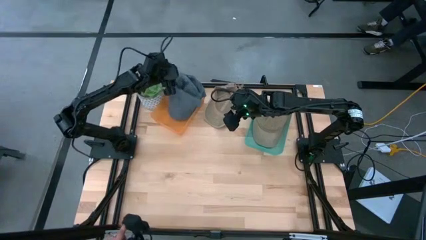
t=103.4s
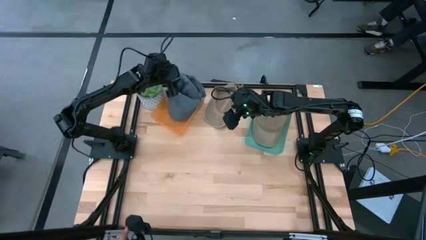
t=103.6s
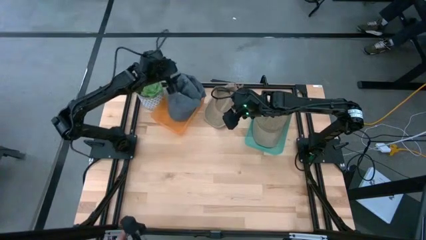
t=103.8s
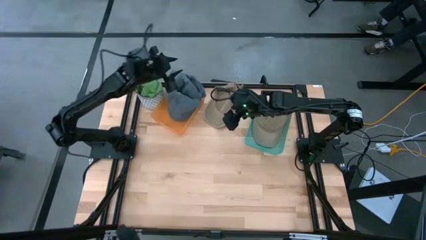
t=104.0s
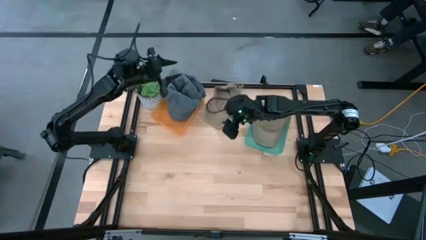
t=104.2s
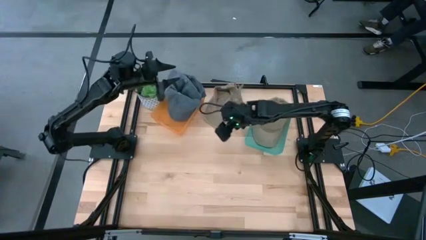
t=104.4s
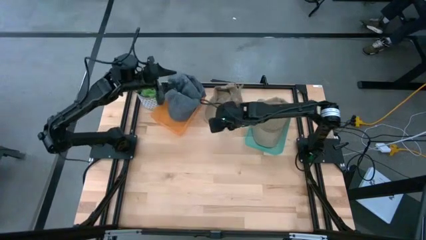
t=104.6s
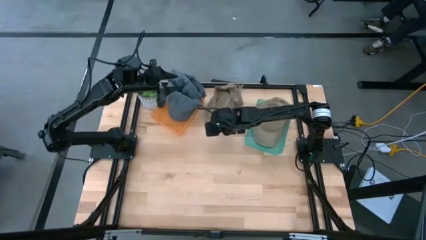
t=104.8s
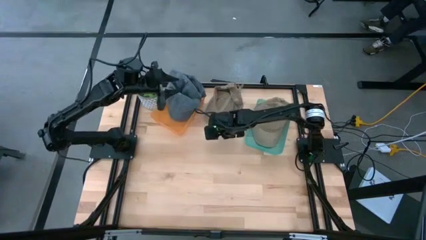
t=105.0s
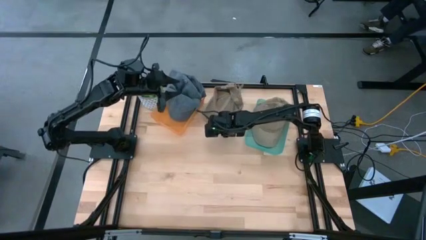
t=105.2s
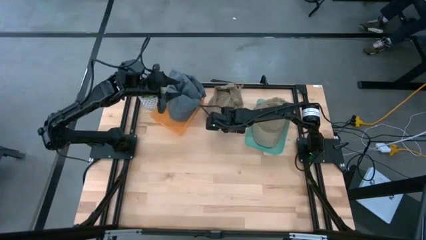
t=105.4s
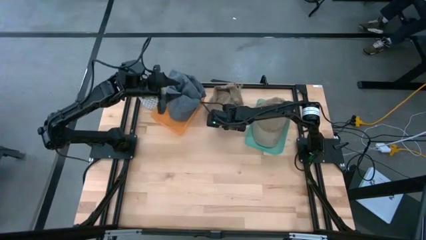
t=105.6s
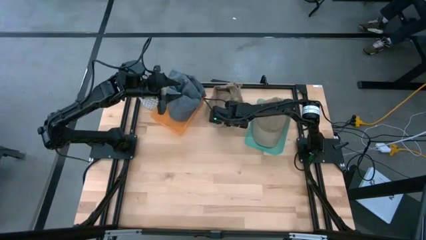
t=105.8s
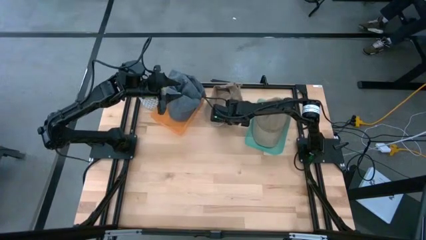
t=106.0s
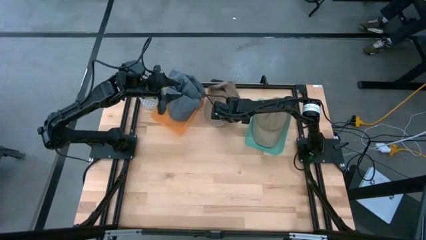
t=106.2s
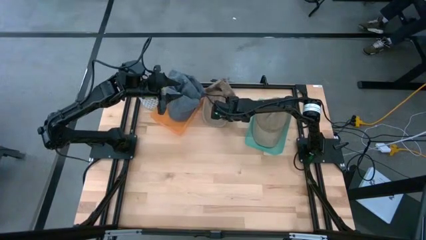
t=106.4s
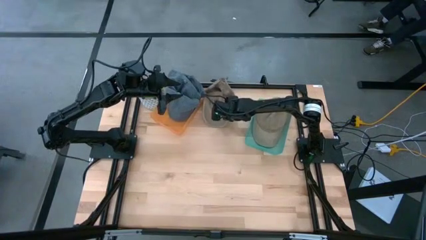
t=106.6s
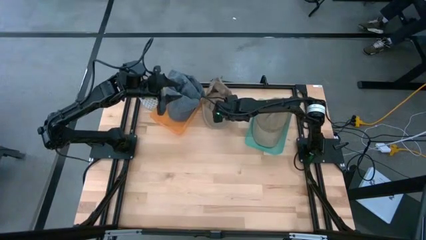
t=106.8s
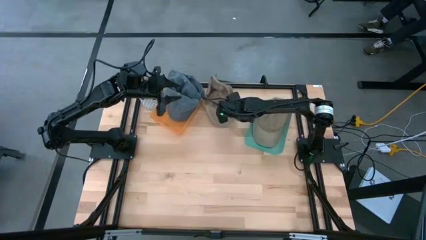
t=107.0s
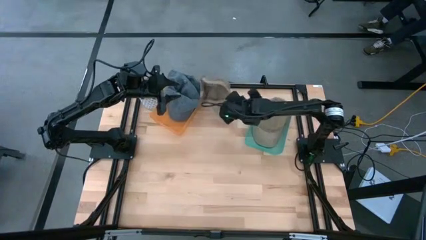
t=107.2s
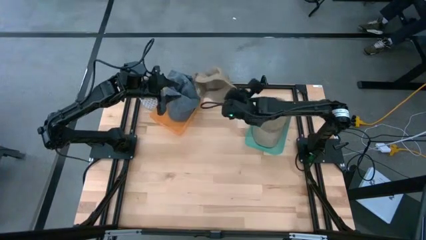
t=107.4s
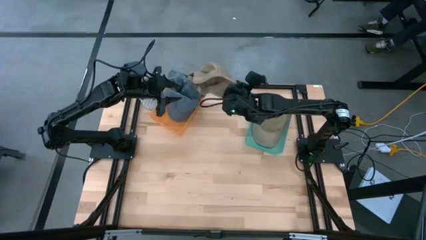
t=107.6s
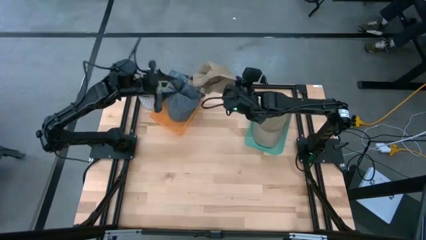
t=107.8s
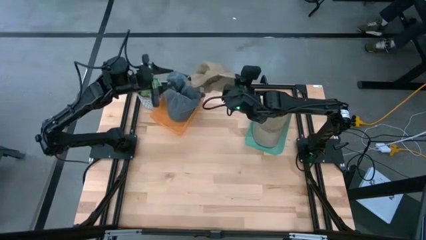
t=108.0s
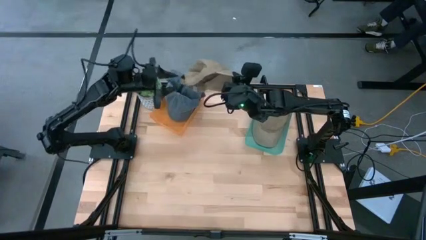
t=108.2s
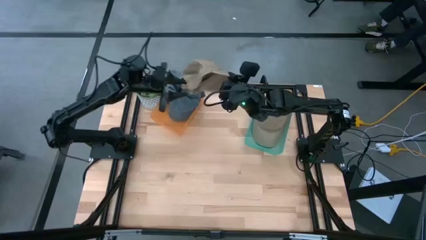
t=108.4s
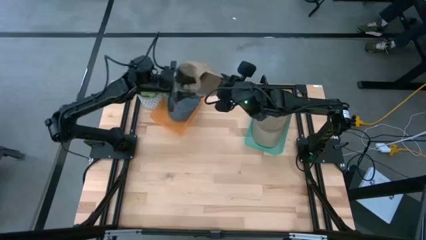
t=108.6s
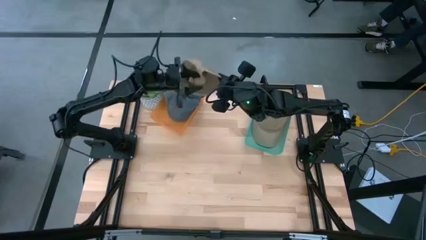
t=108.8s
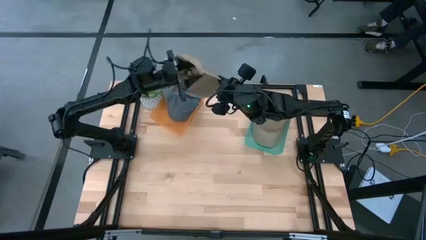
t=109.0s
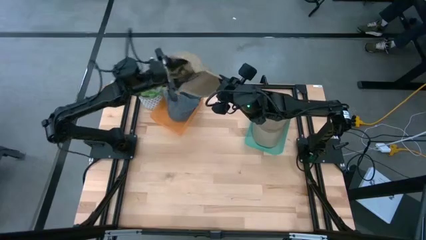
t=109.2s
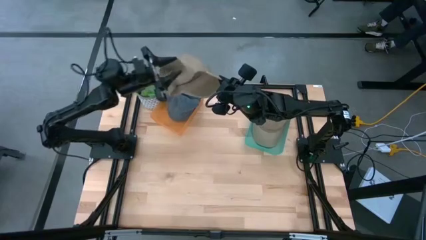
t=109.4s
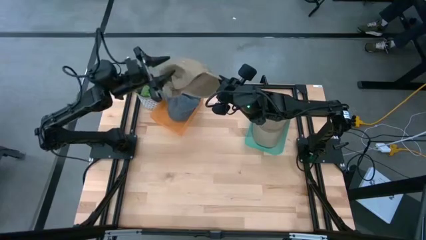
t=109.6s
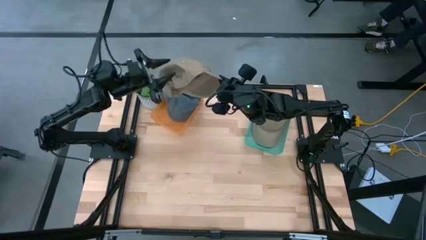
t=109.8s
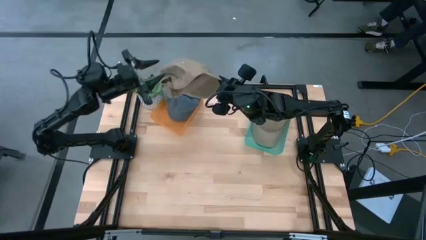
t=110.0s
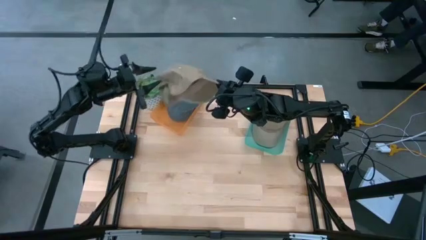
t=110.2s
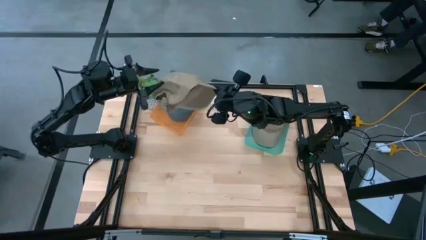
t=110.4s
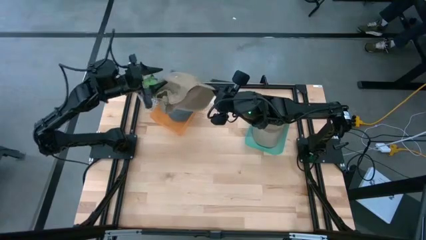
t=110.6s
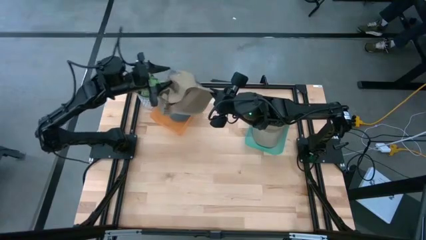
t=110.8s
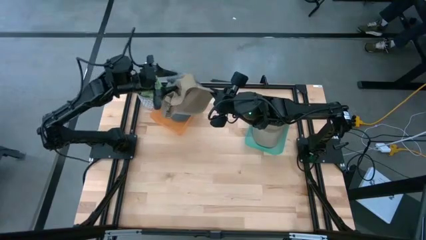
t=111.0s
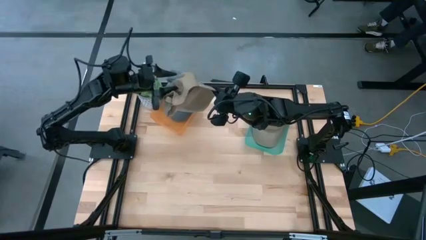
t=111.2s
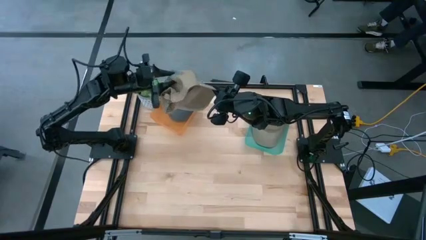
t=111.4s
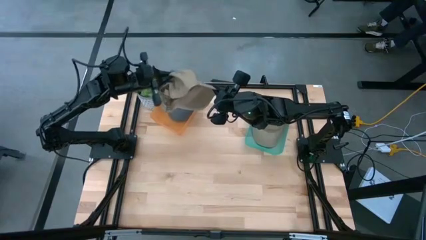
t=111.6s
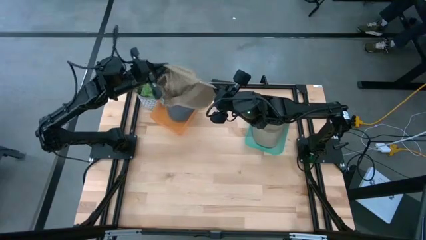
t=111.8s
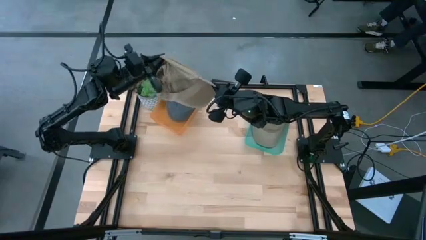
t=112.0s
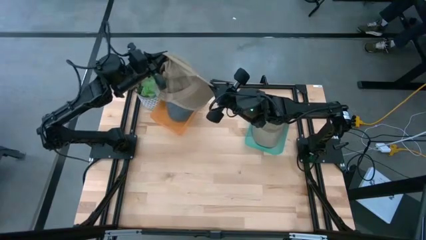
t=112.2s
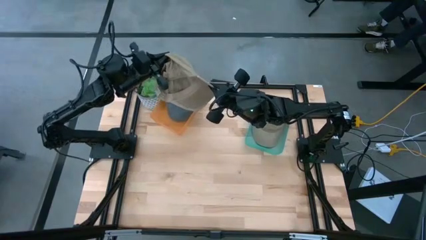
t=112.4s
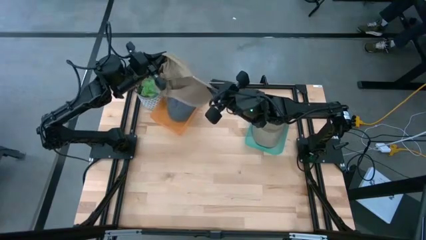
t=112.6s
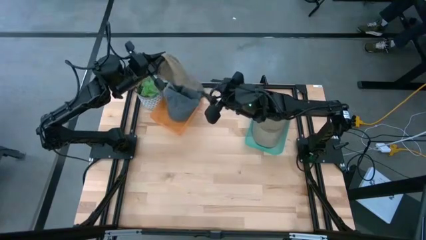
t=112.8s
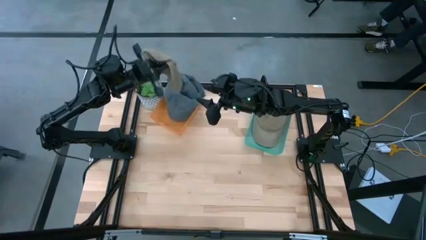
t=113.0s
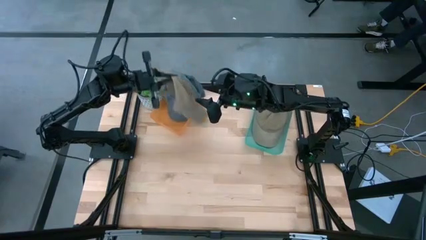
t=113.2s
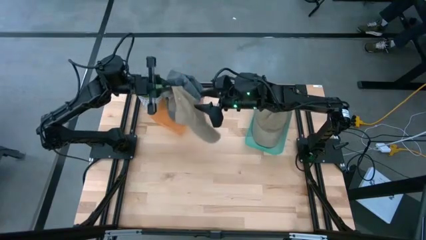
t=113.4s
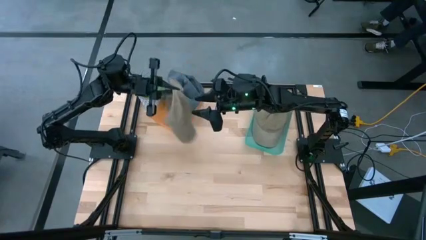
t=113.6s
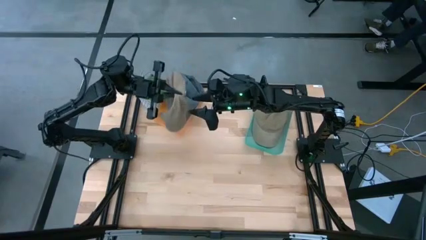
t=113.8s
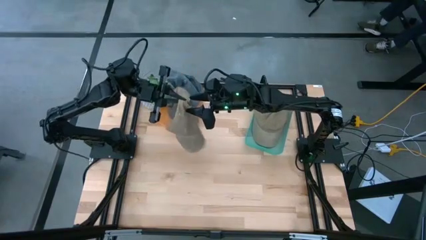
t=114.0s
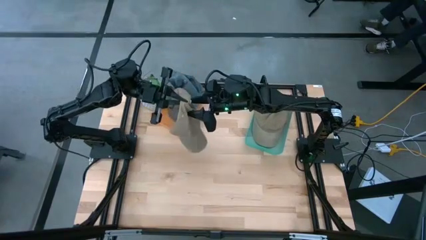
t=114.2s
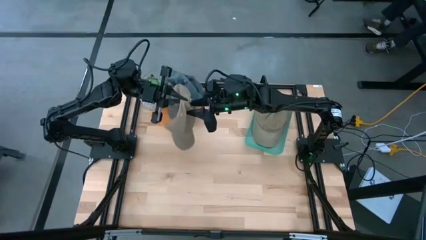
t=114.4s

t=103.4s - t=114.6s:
Task: Pick & Place hat
Put the brown cap into the blue bin

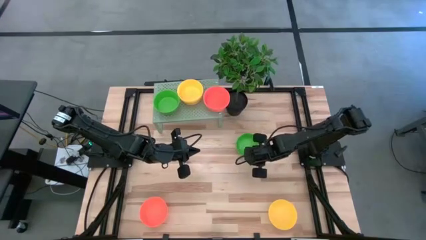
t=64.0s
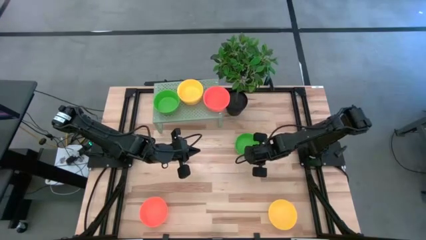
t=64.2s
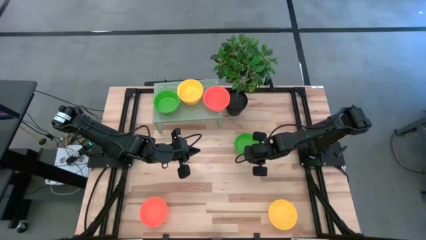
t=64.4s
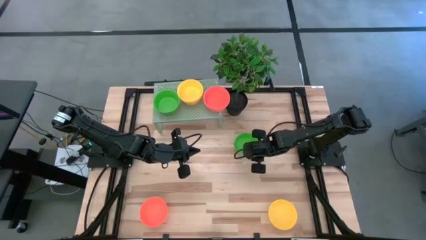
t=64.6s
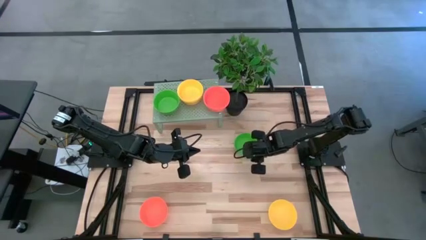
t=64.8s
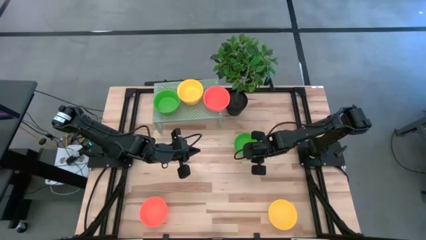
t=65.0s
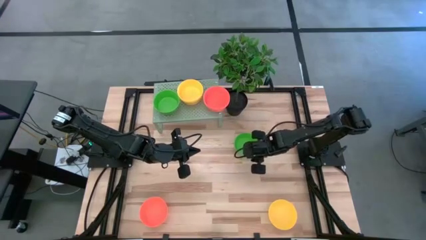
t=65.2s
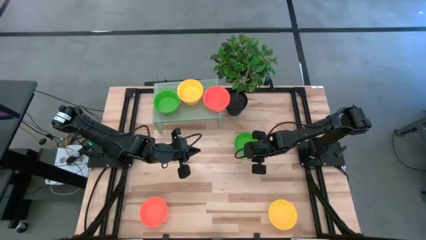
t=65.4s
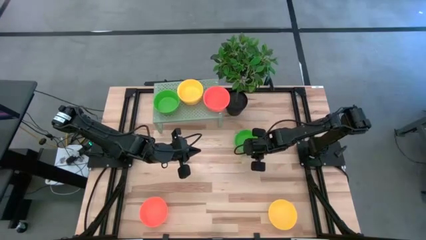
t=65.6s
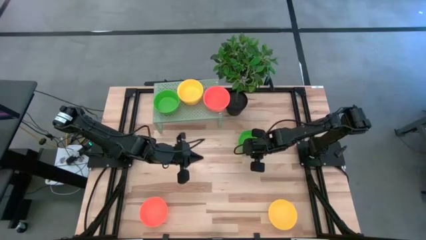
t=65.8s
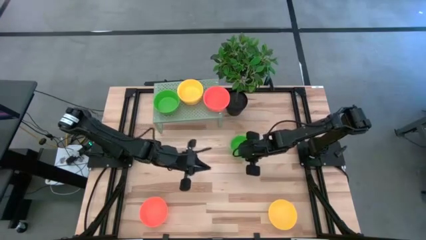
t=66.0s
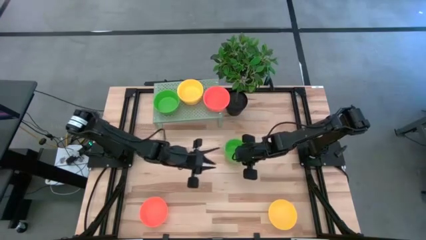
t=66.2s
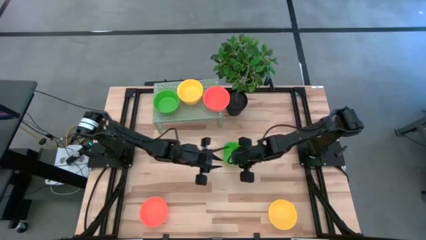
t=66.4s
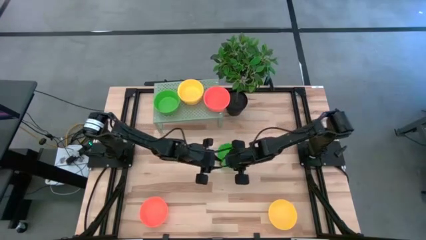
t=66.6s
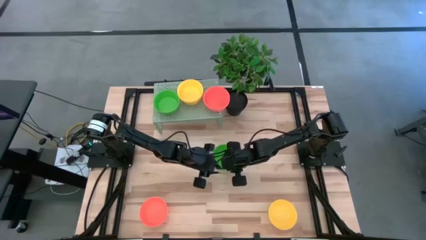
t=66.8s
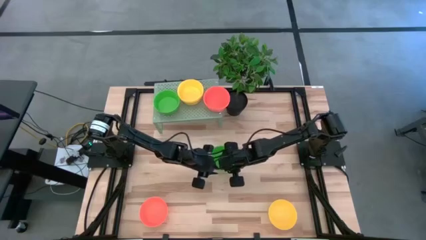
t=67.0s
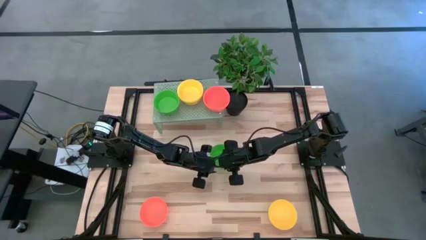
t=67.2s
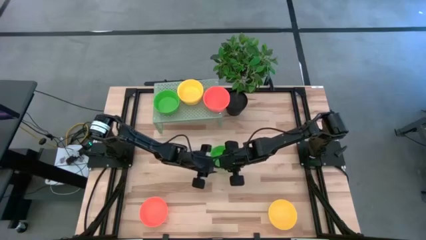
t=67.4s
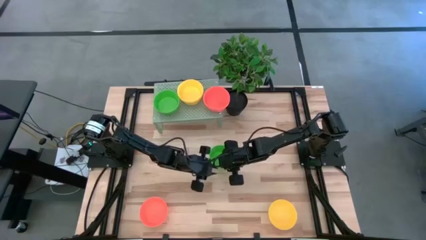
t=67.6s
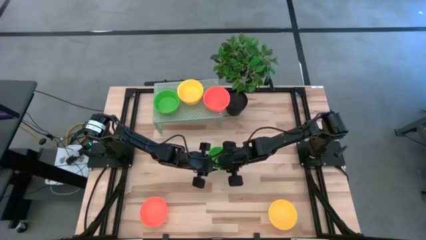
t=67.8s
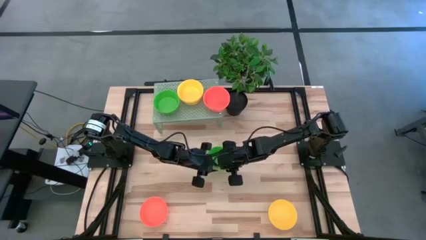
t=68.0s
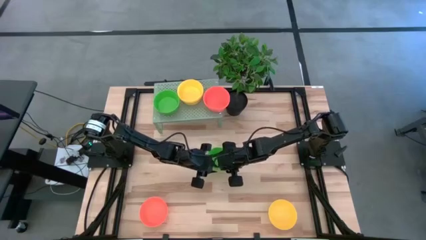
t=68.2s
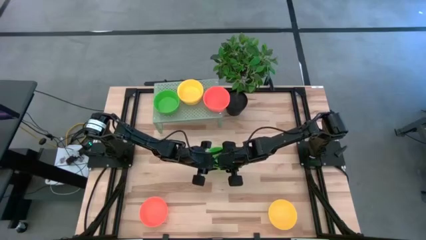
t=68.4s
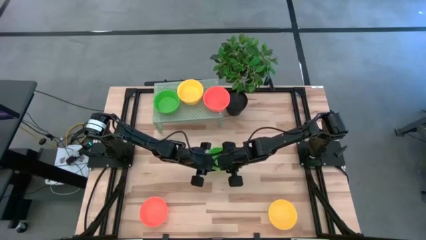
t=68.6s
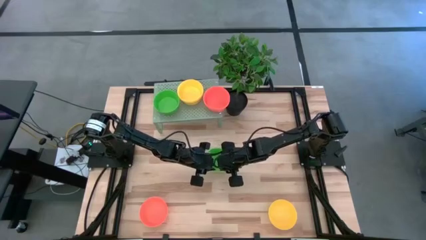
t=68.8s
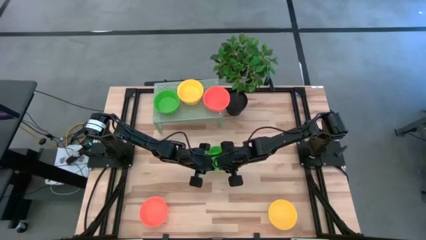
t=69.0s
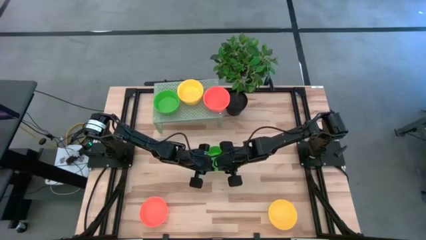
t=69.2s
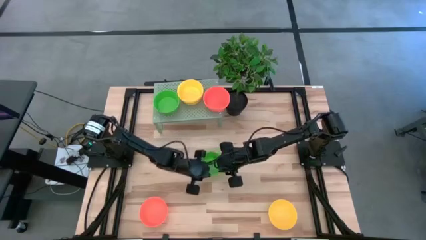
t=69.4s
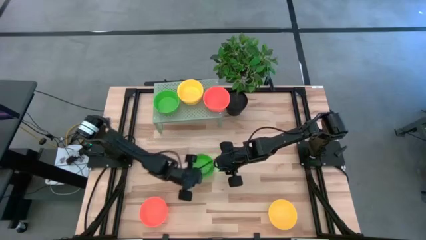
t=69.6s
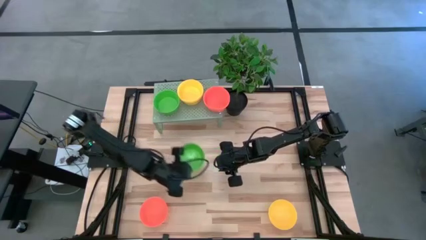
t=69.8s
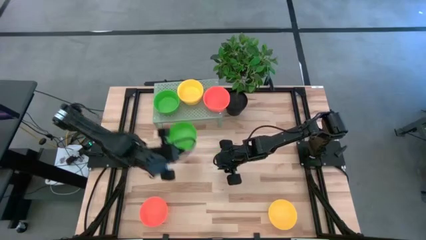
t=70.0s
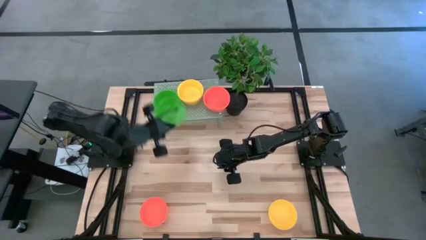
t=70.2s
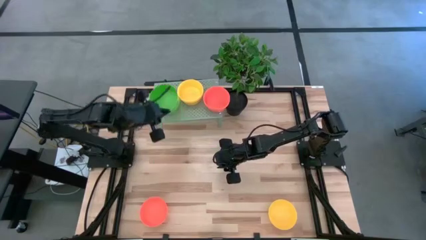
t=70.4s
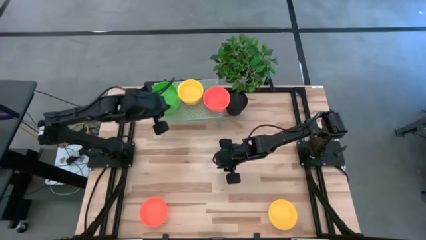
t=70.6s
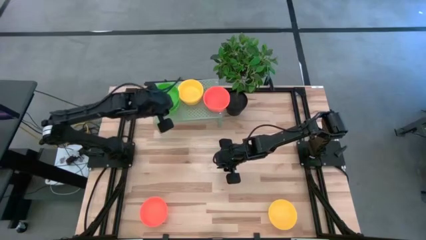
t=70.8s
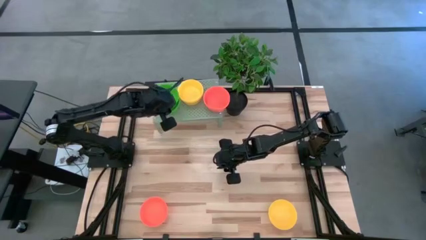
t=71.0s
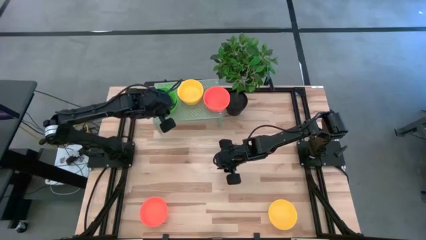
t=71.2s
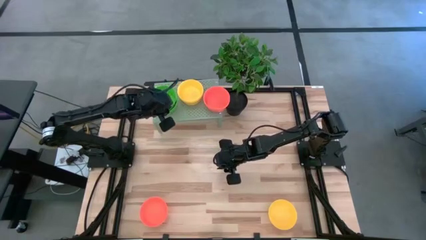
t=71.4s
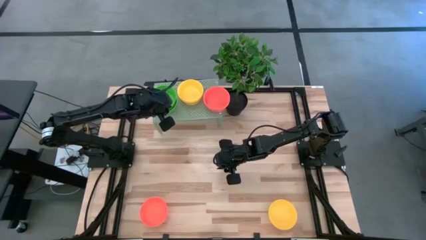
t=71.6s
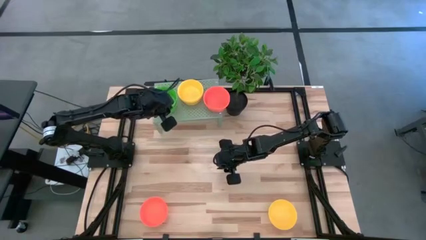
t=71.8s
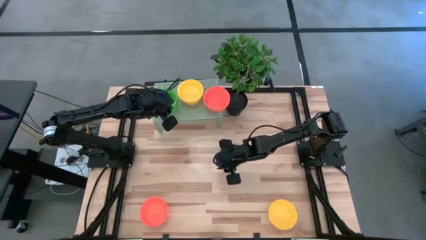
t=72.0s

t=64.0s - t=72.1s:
Task: Pick & Place Mini bowls
Stack the green bowl on top of the green bowl on the shelf
